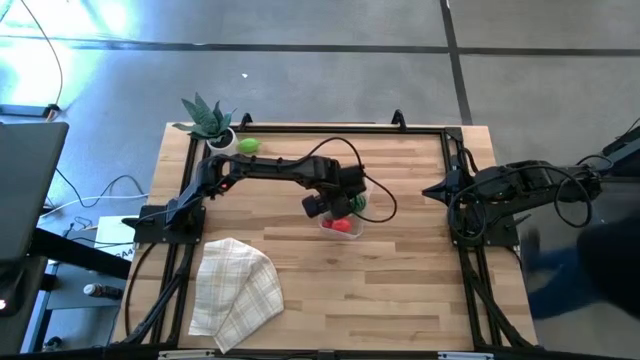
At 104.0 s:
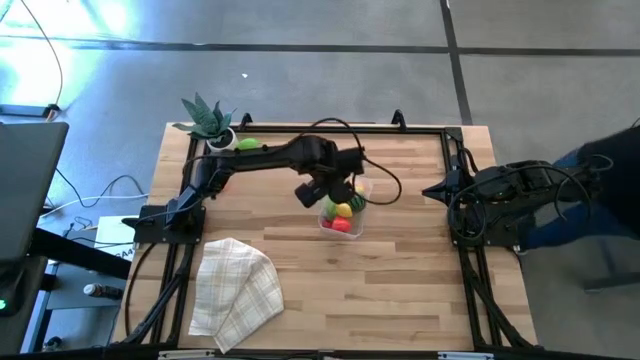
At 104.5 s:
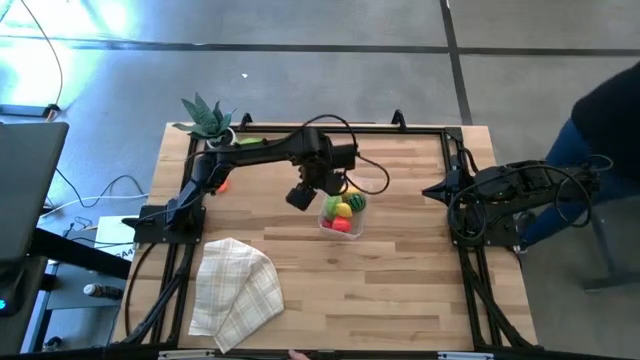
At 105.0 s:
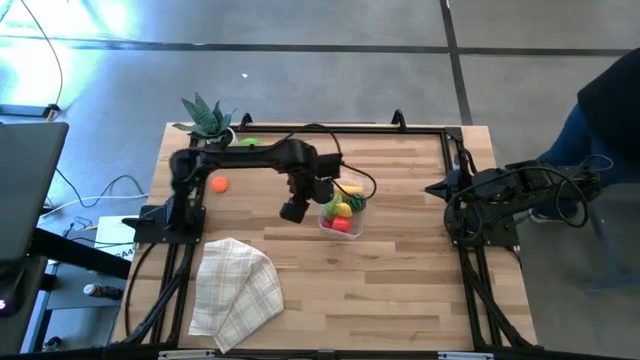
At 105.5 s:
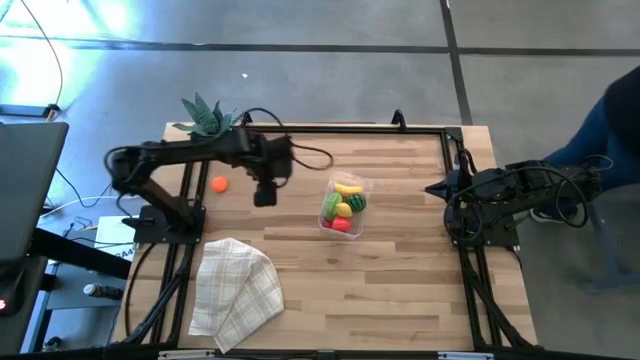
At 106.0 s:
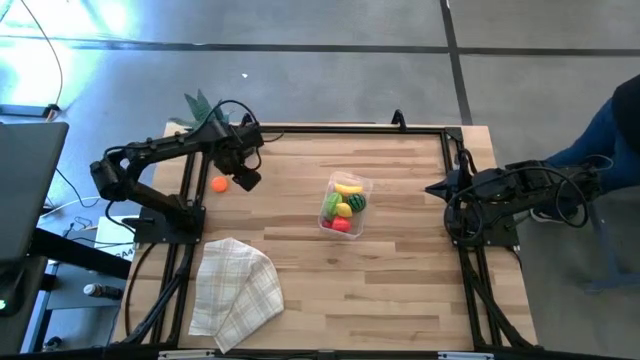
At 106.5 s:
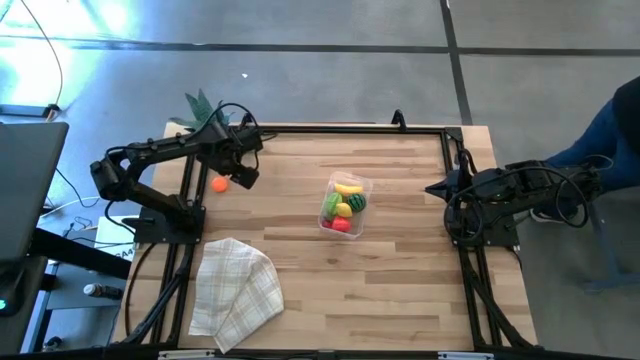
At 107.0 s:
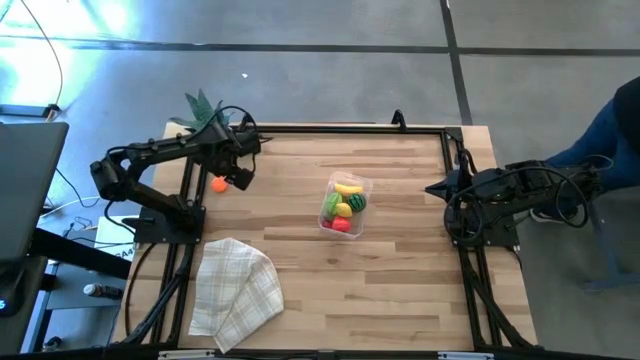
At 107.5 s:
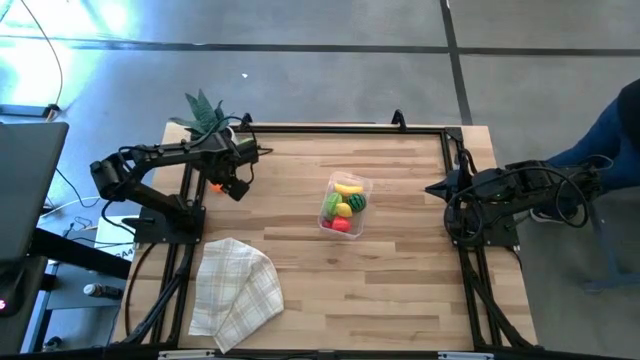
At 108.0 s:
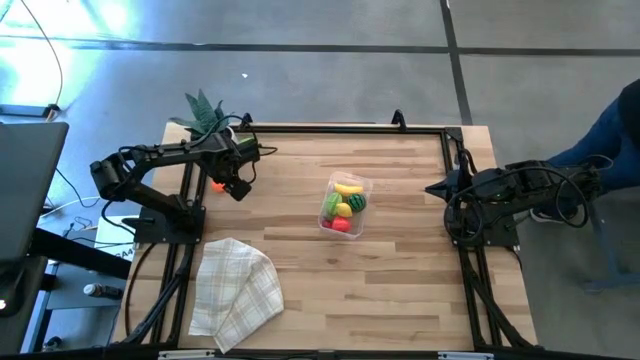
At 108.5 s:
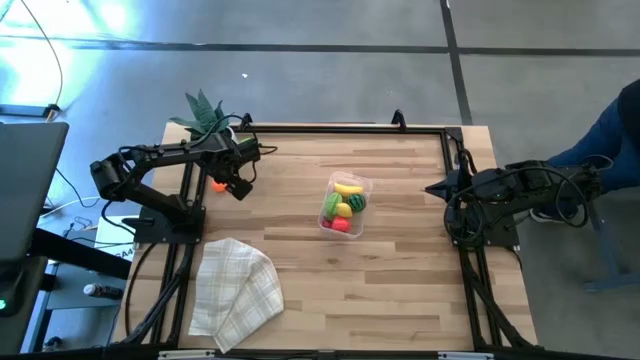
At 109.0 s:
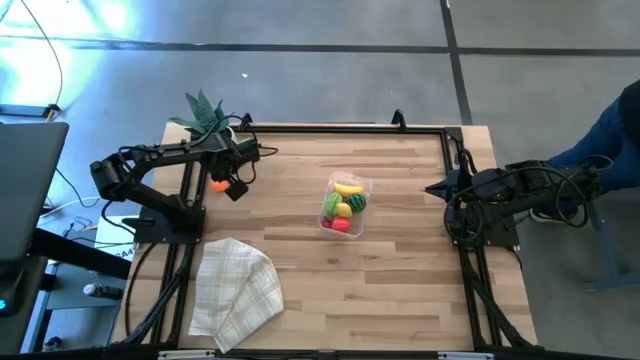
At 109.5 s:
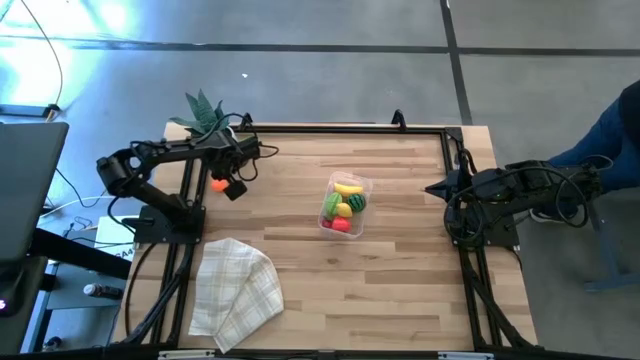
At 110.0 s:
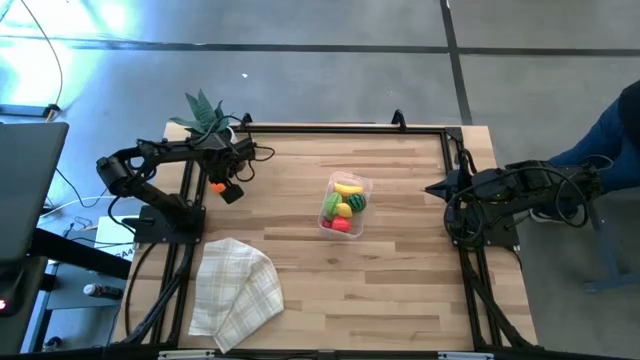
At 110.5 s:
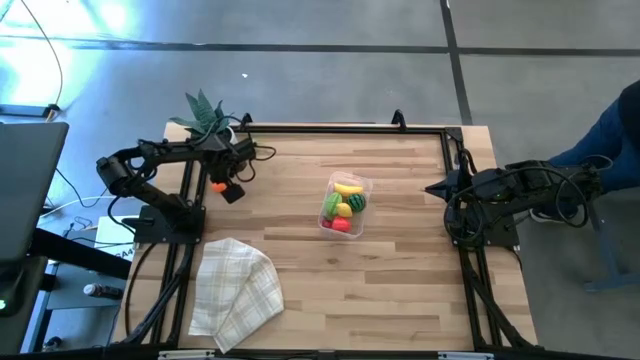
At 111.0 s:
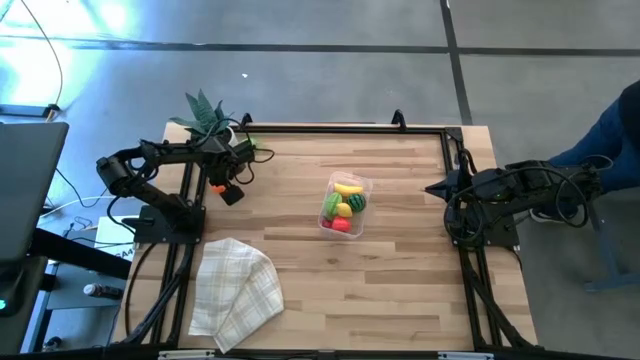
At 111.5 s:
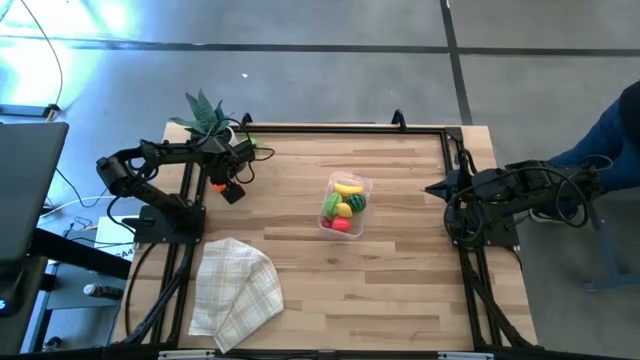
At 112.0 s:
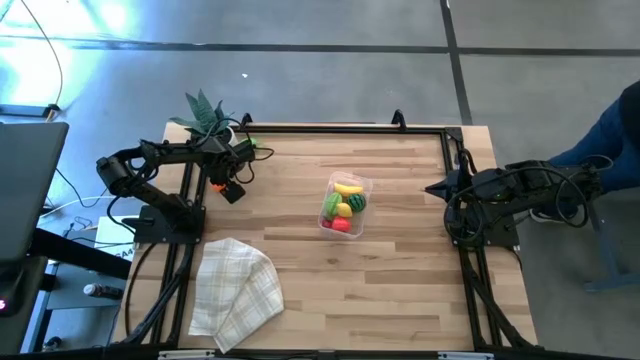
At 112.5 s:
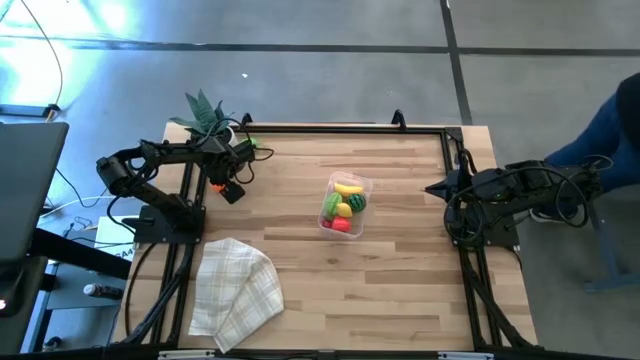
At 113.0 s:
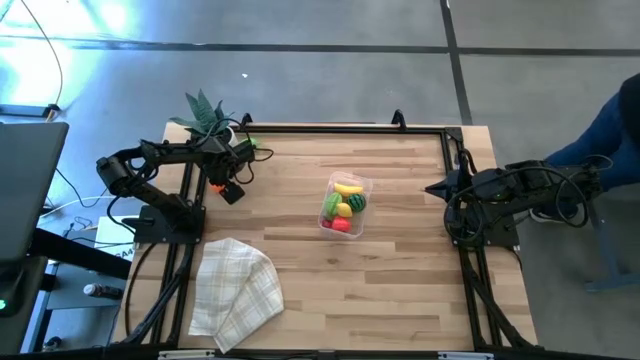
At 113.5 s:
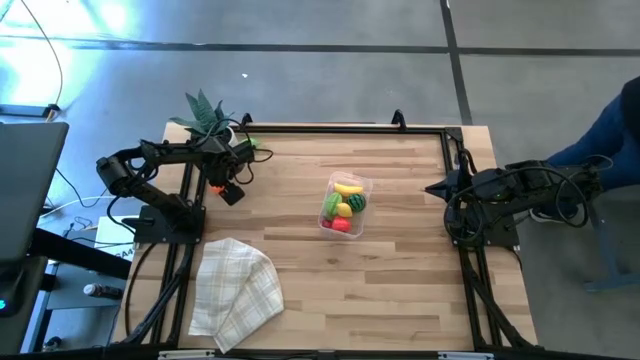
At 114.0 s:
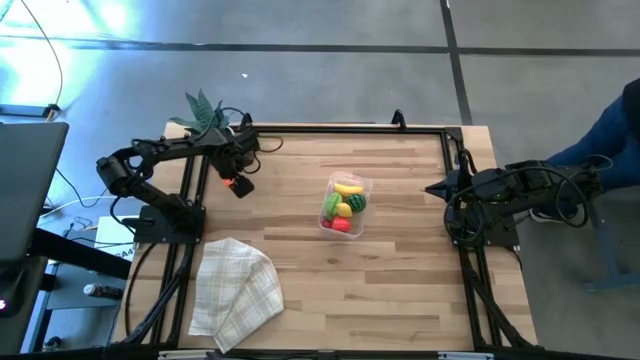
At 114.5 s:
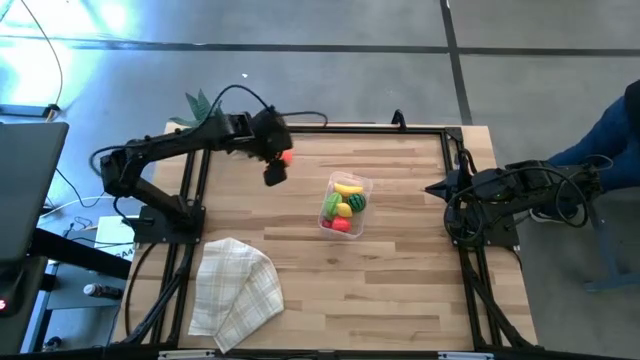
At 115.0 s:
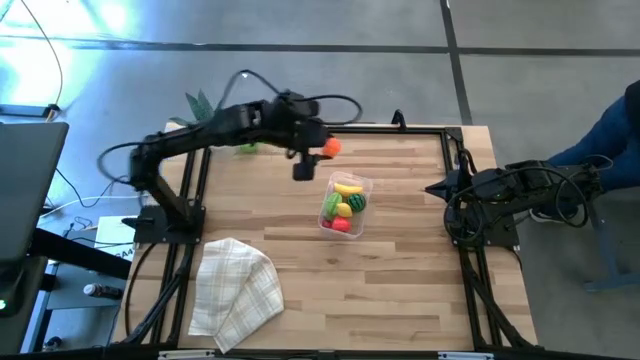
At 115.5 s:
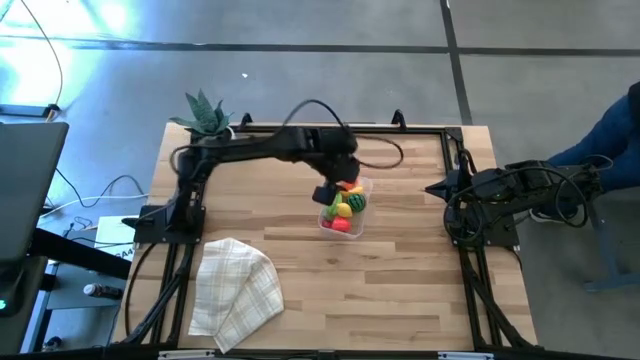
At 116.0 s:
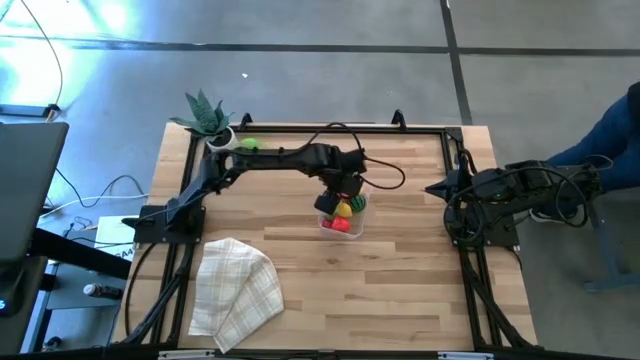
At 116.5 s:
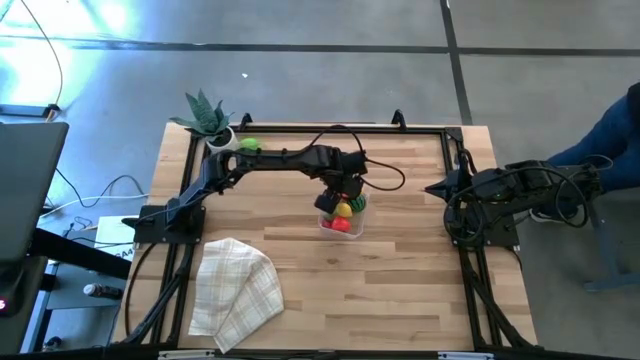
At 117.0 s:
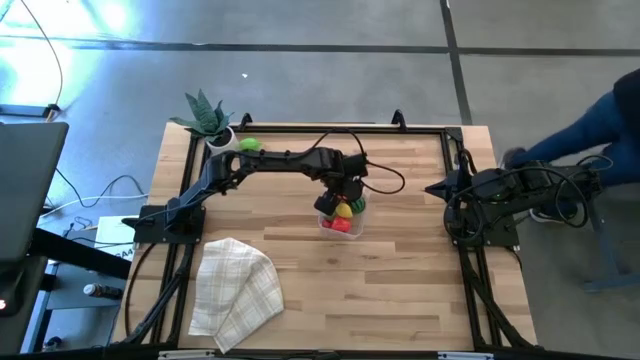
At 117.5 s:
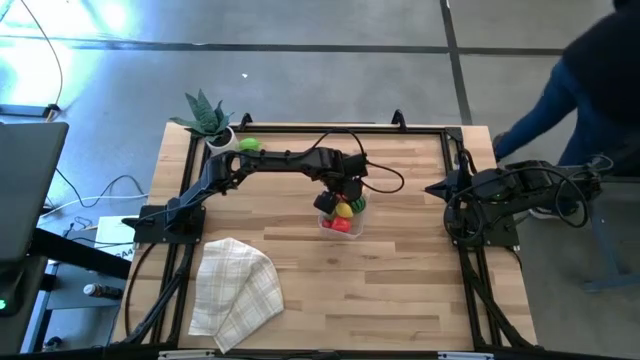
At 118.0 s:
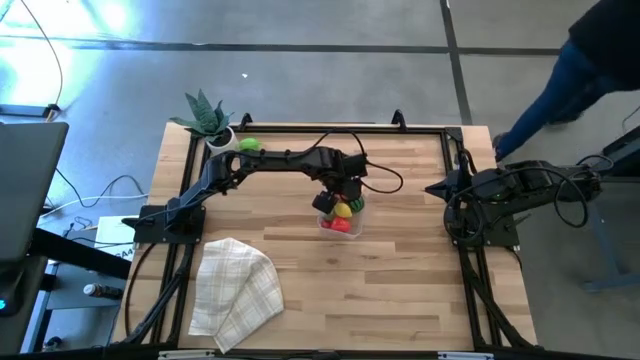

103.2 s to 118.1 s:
Task: Pick and placing Produce into tupperware
Put the pumpkin into the transparent bin

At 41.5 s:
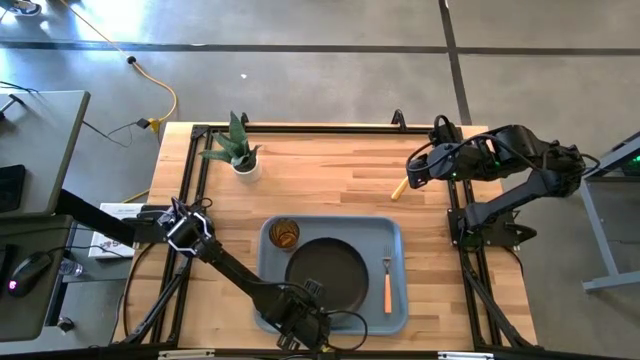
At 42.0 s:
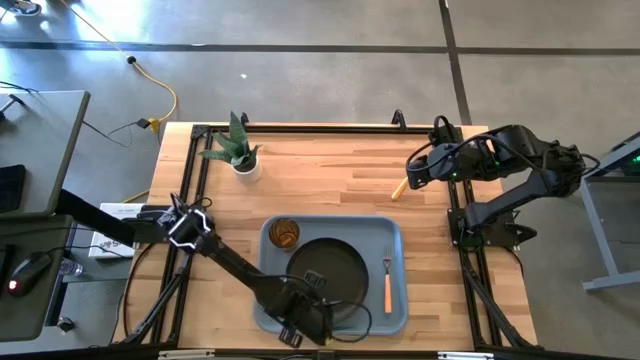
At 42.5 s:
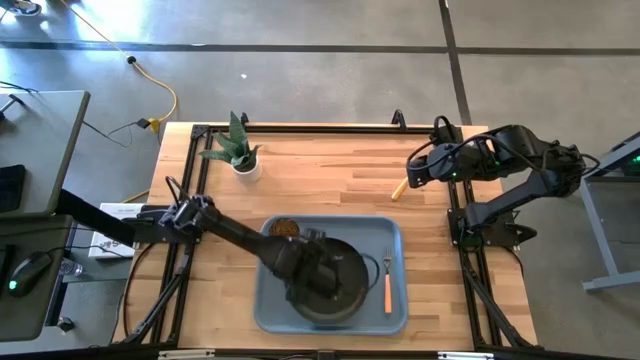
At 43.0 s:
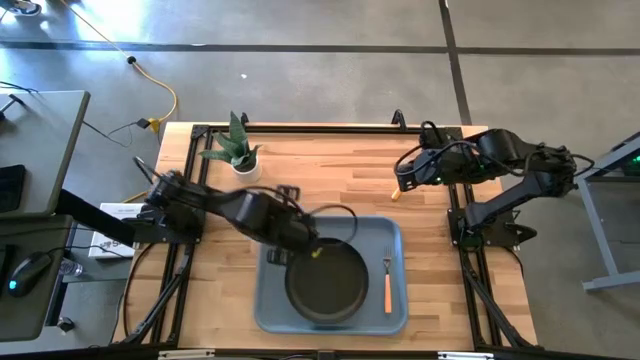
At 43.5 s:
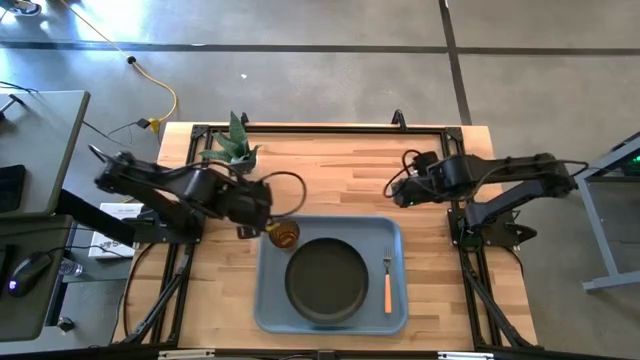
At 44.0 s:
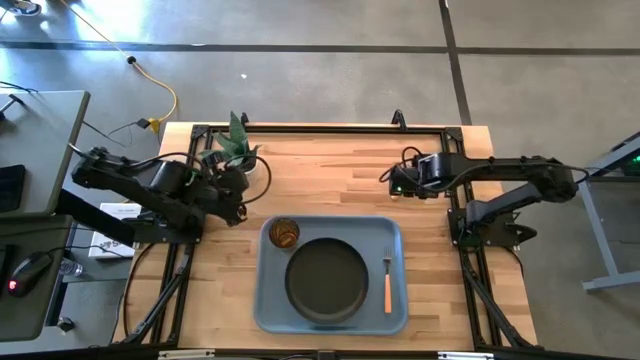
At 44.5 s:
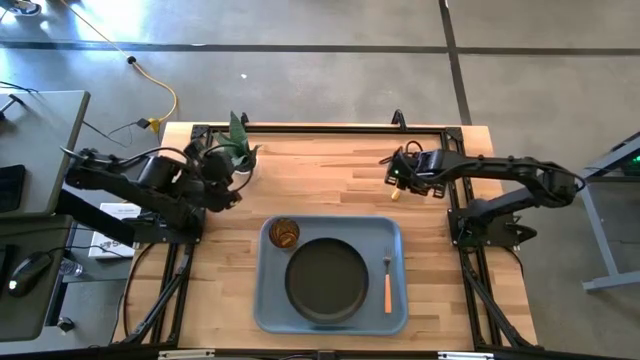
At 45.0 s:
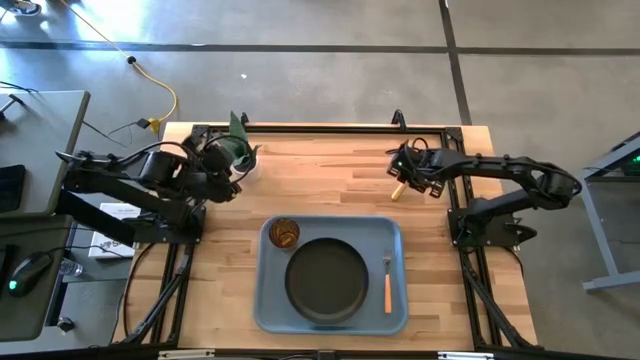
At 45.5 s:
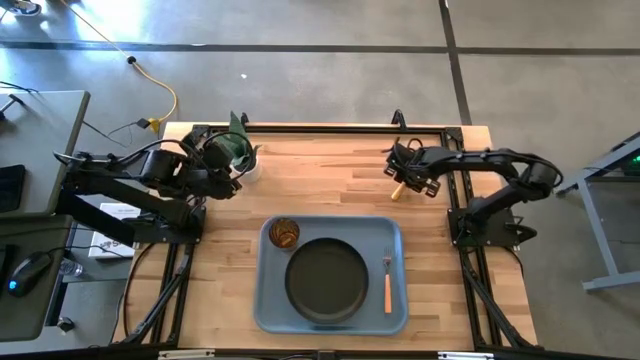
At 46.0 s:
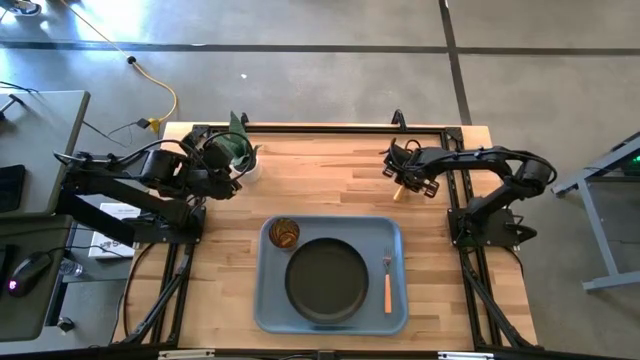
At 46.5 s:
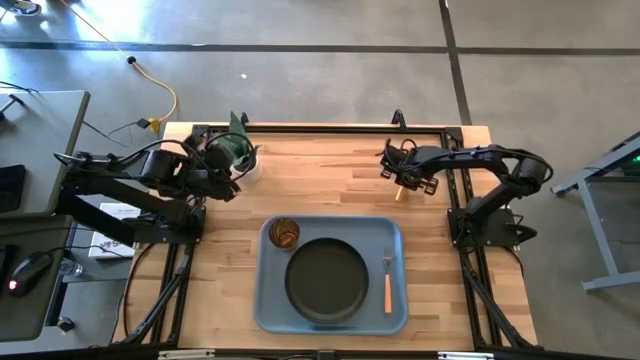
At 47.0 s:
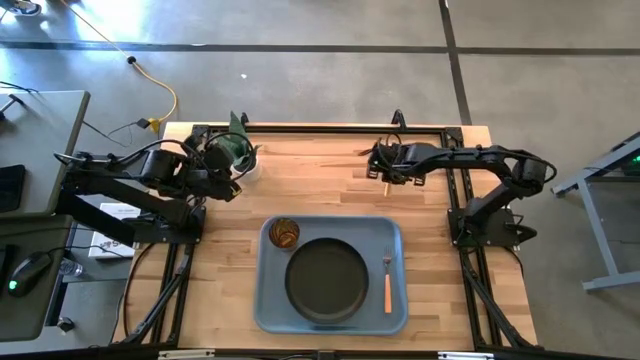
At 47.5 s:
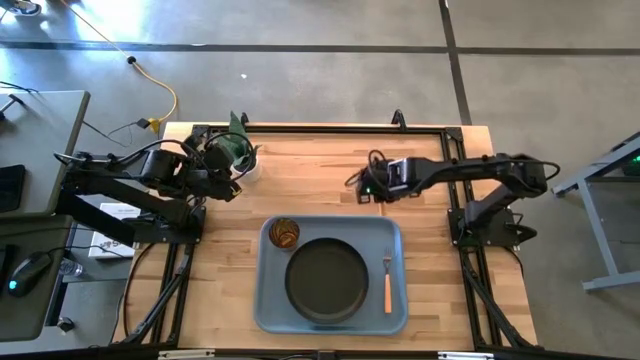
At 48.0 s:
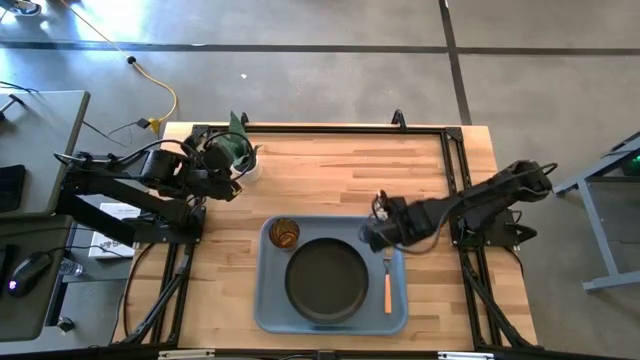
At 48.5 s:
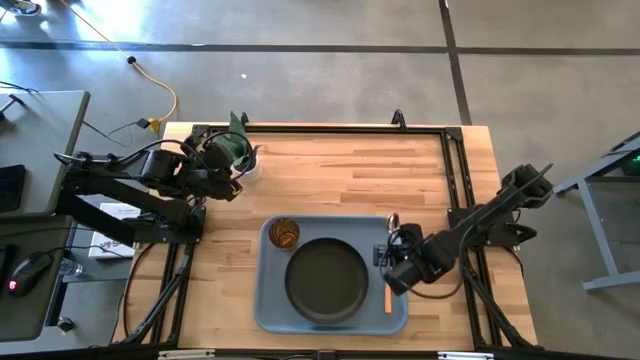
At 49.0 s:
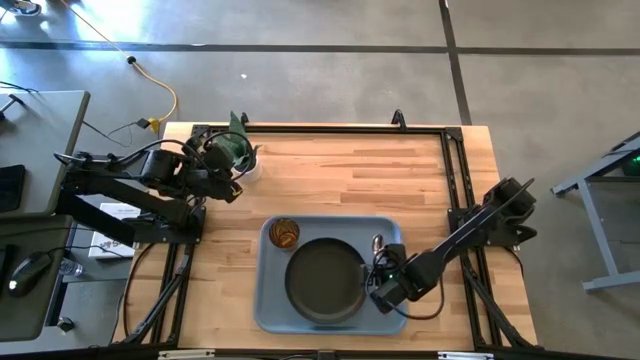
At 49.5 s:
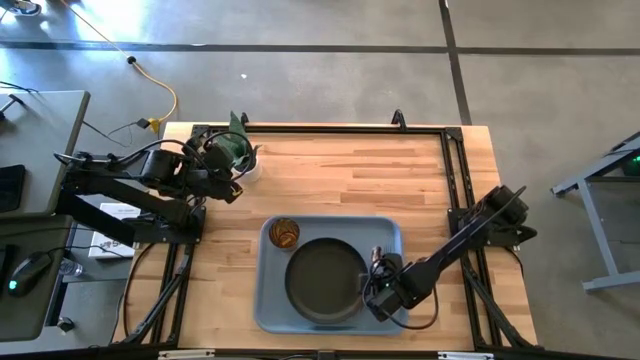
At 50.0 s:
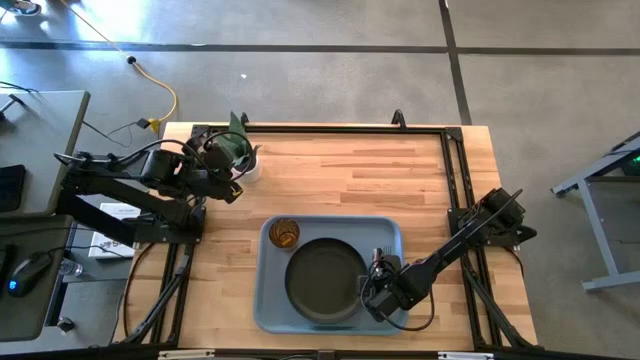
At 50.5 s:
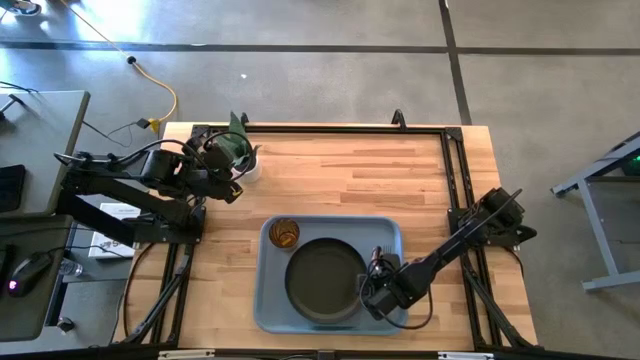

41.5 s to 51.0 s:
Task: Pick and place plate/cup/fork/spoon on tray
Put the yellow spoon on the blue tray to the left of the yellow fork
